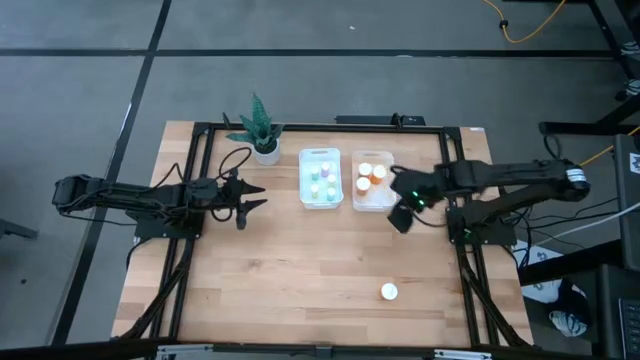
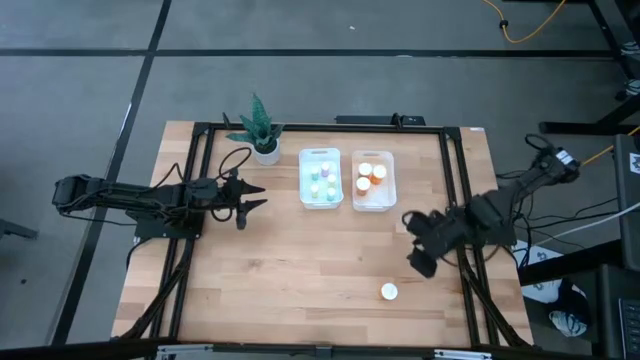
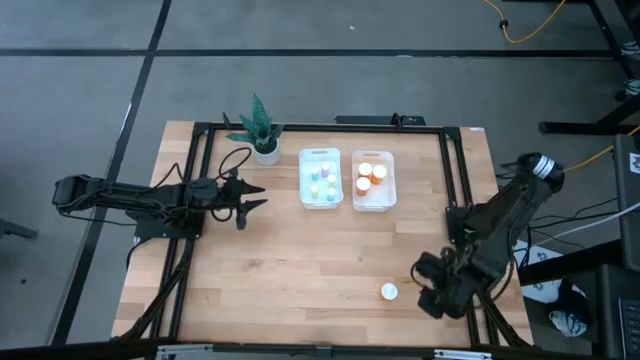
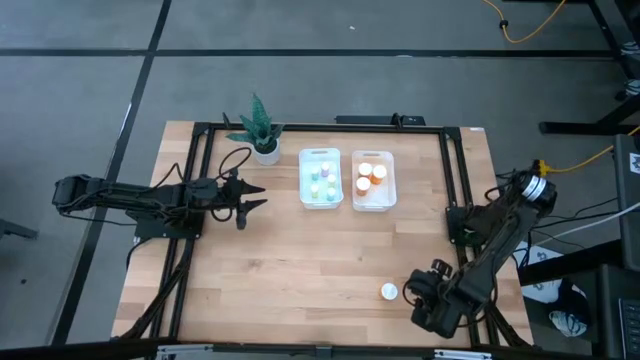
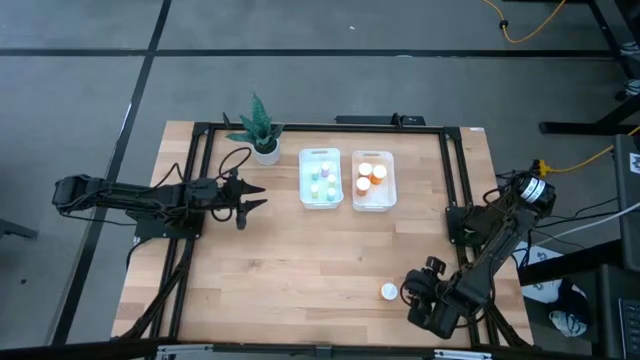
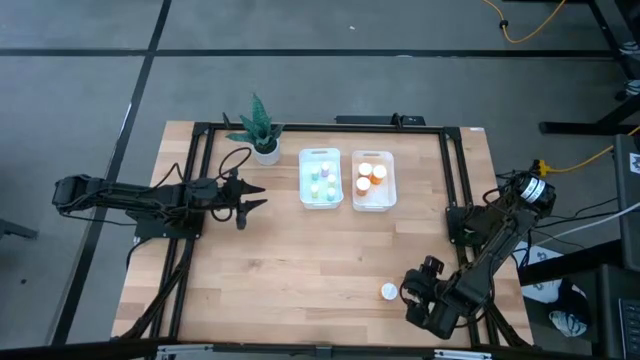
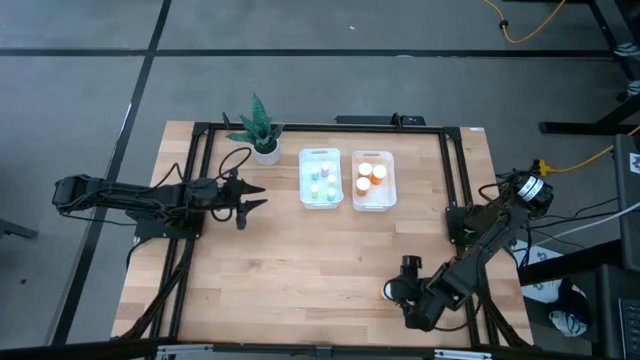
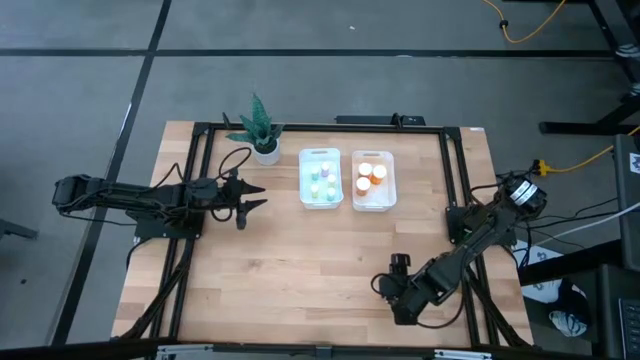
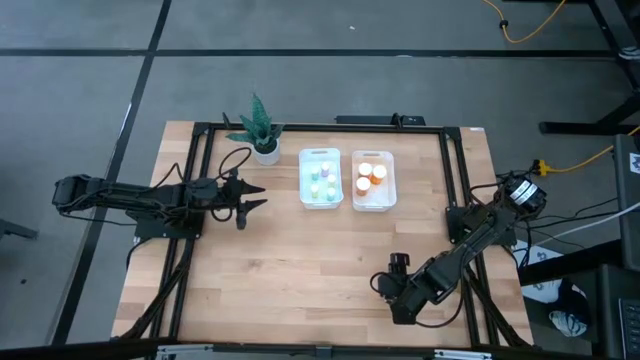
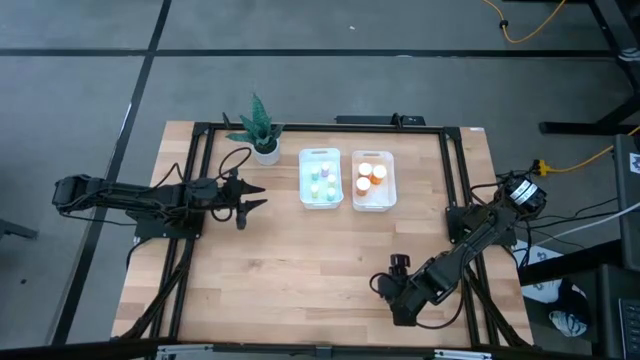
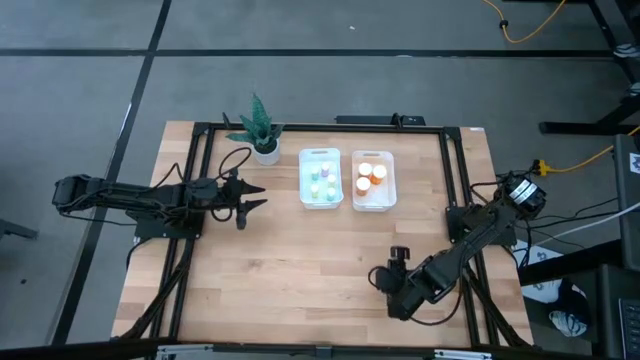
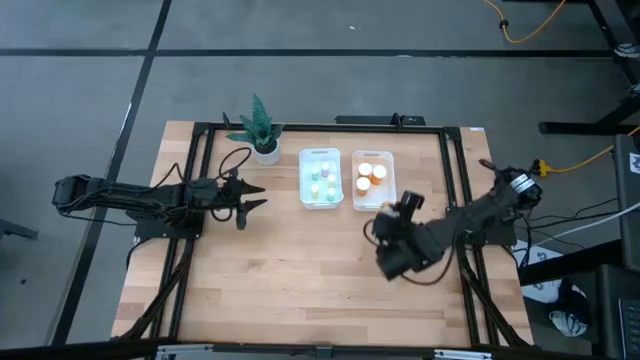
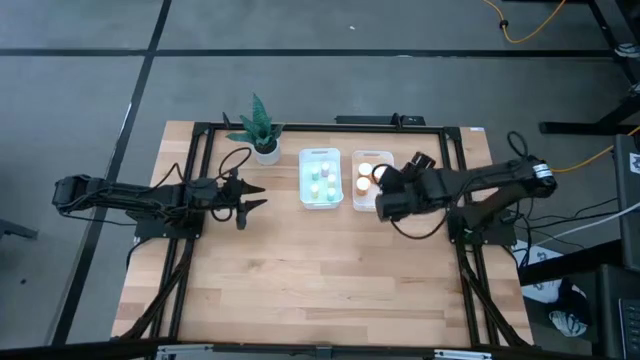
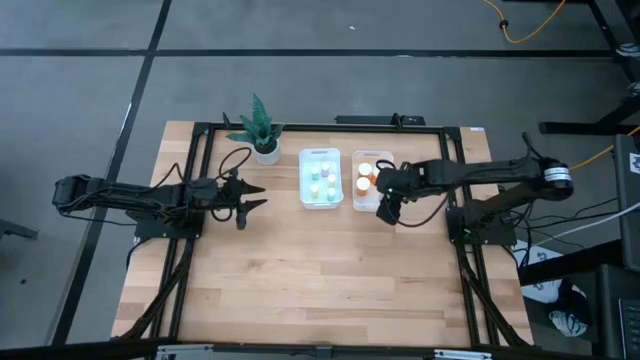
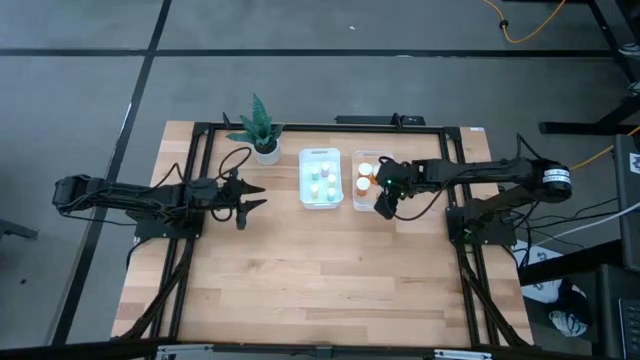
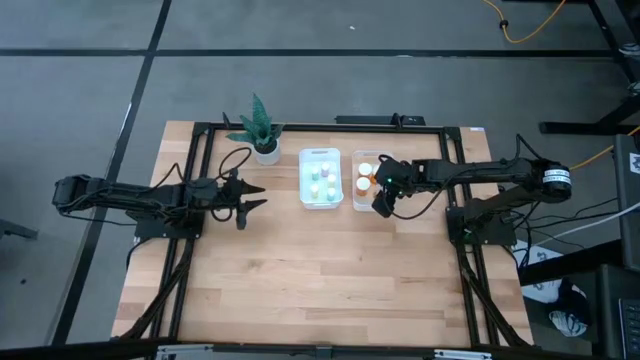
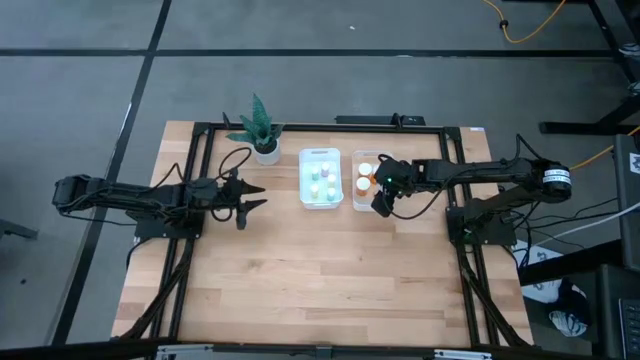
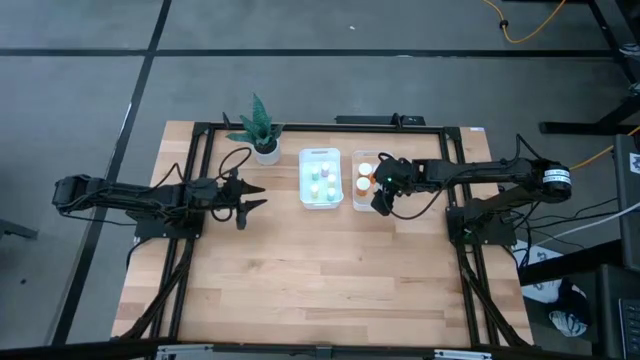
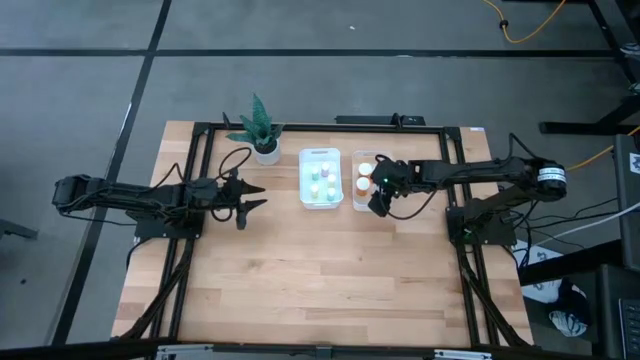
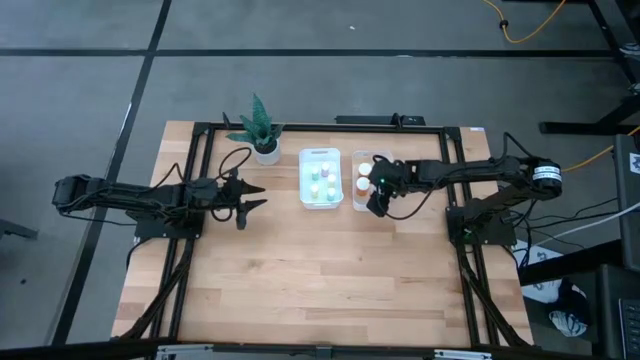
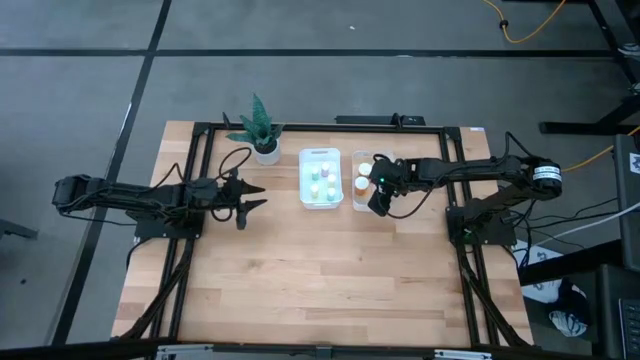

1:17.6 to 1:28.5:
Task: Pick and place medicine bottles into bin by pill shape (circle, oval)
Put the orange pill bottle into the right white bin

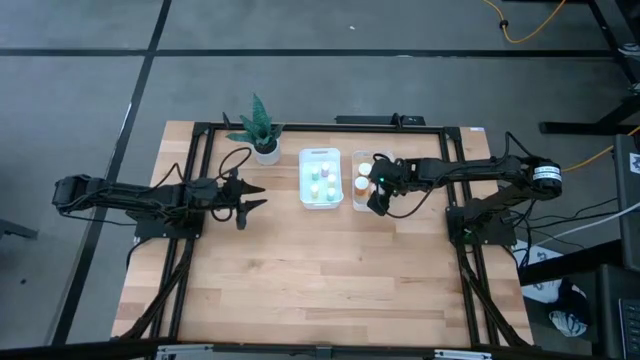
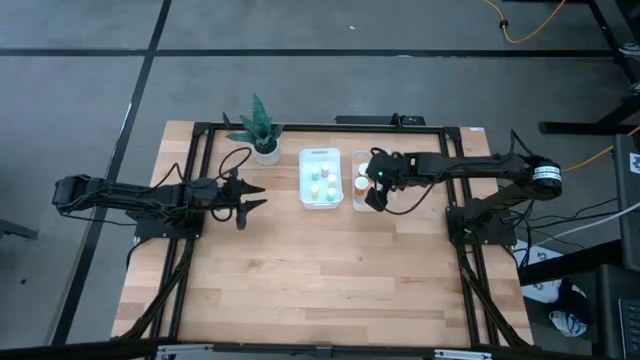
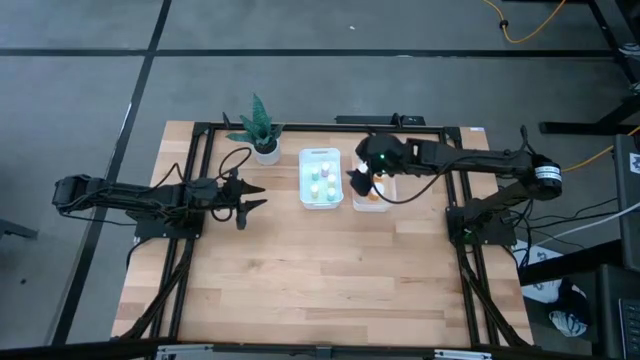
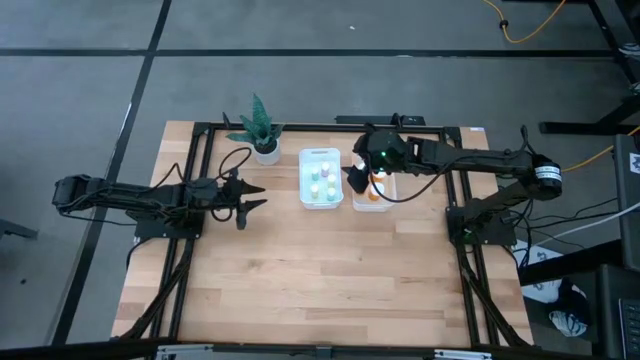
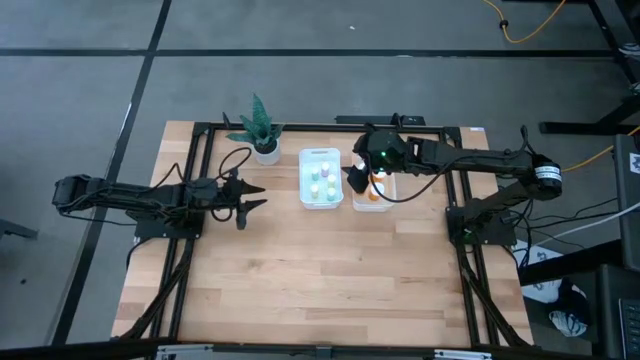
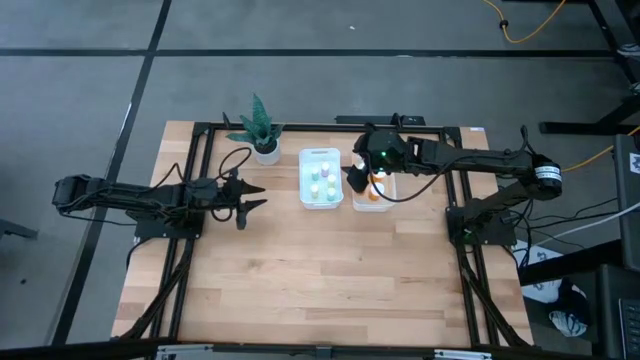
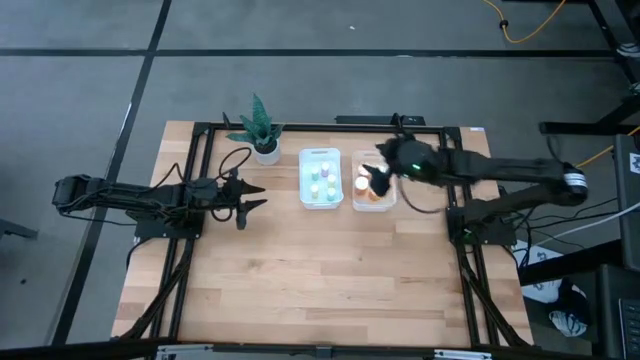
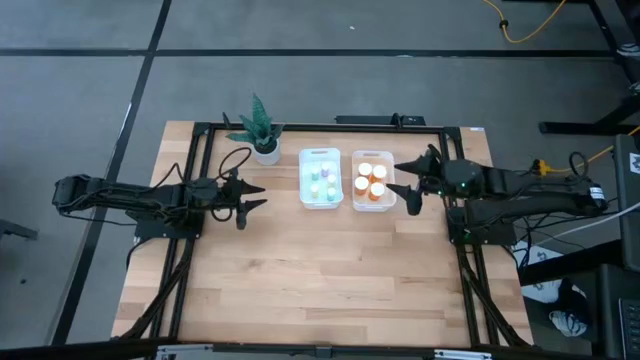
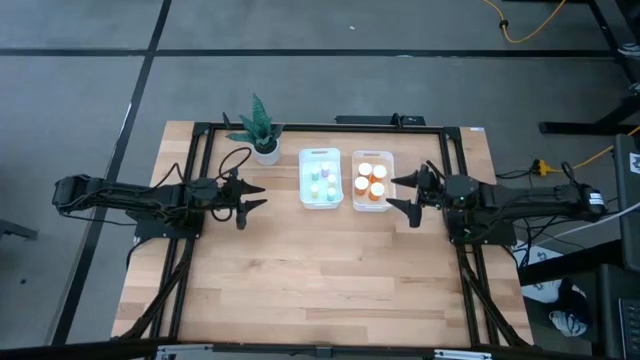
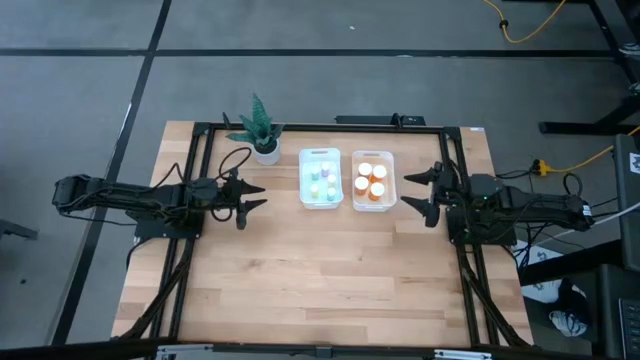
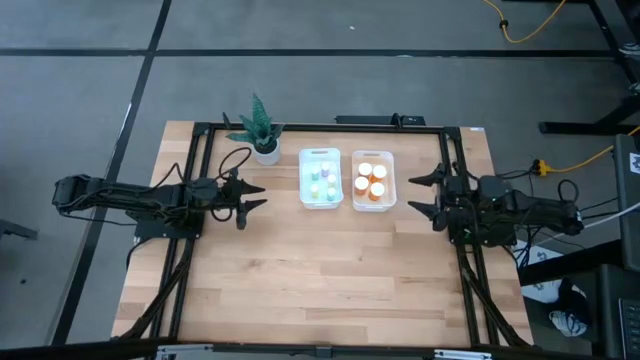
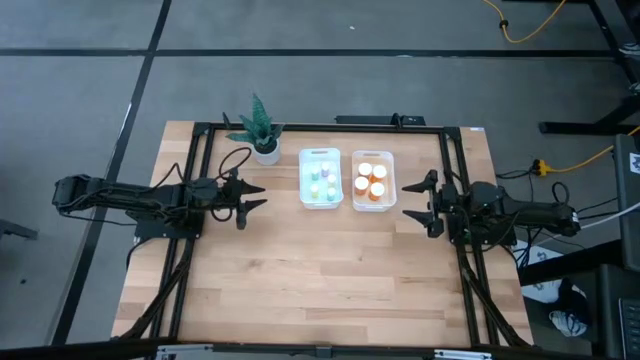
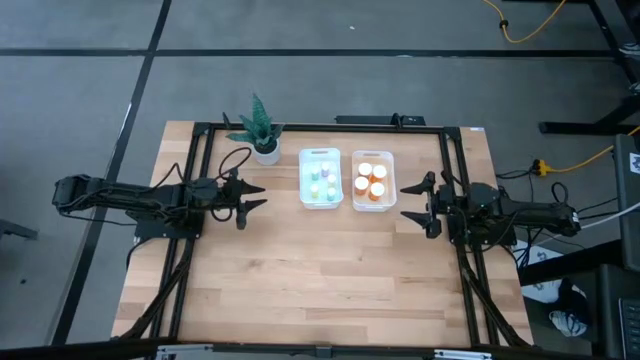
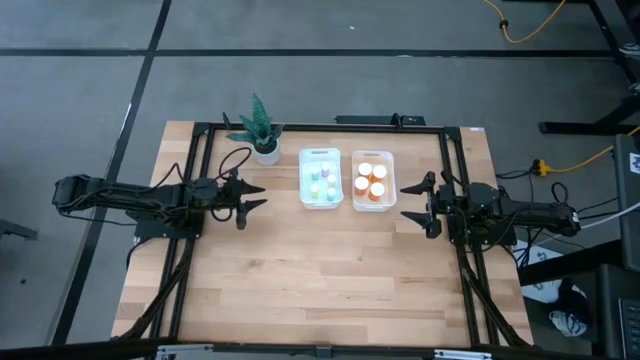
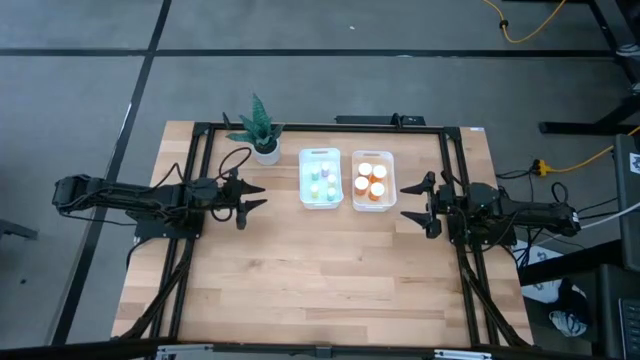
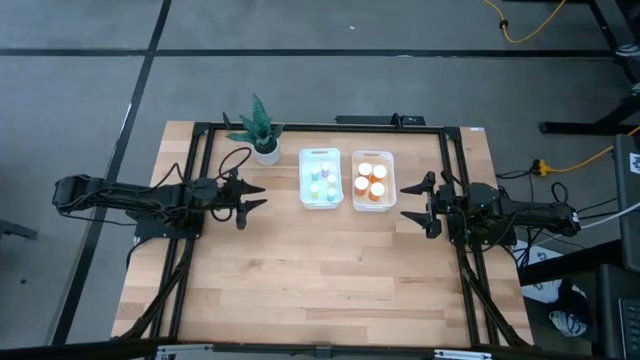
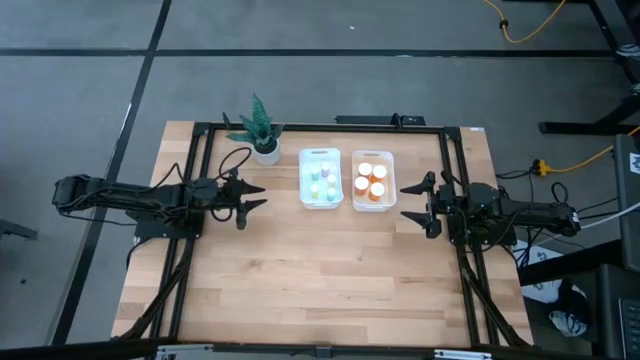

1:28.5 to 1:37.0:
Return to Home Position

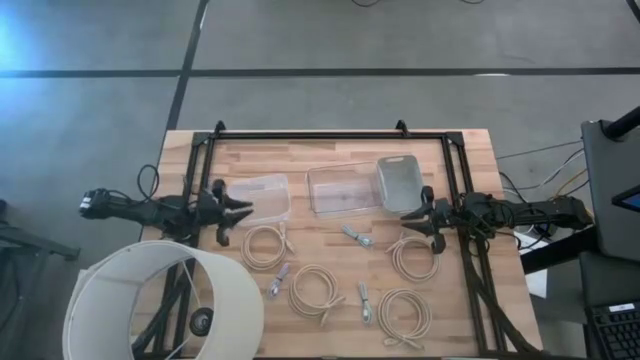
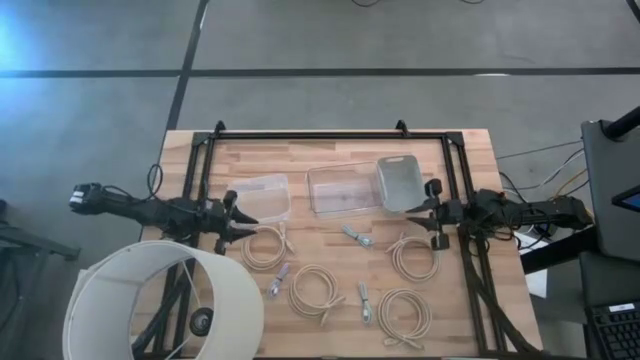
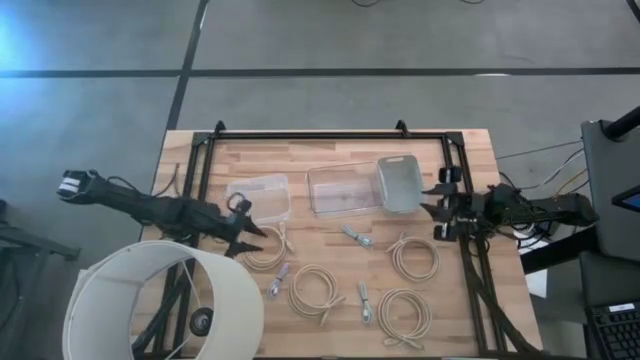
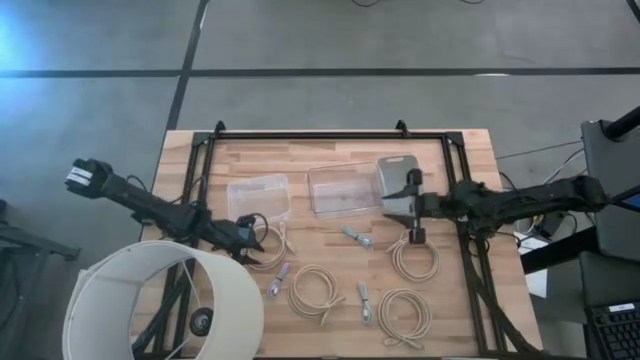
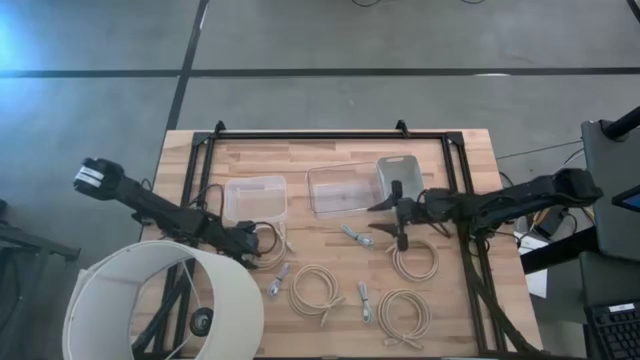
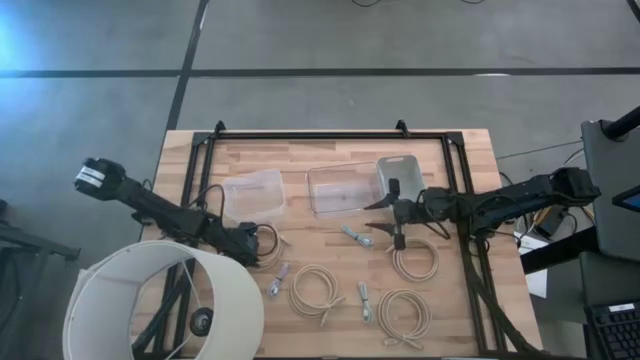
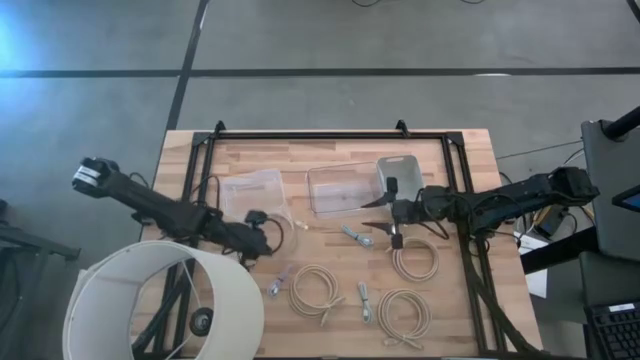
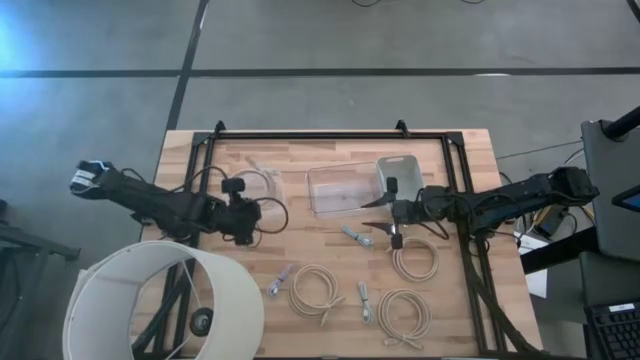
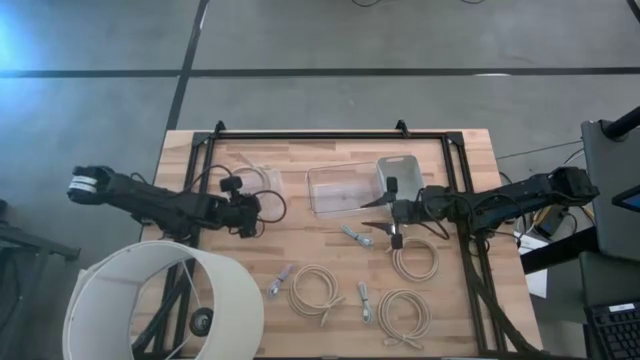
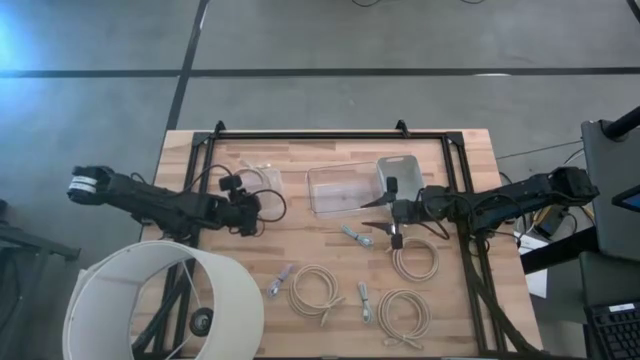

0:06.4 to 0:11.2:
Task: Pick & Place USB Port
Put the top left brown charger cable into the left transparent bin
